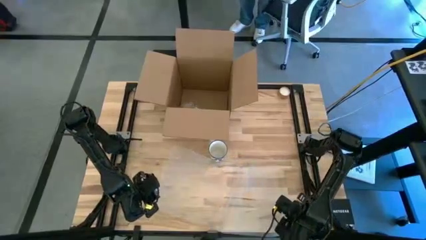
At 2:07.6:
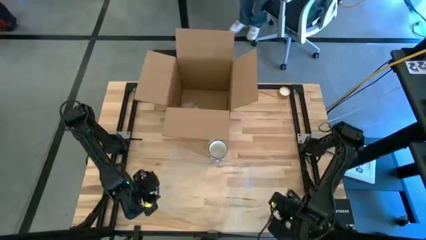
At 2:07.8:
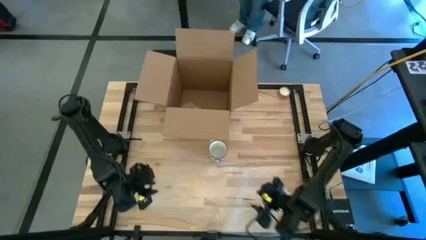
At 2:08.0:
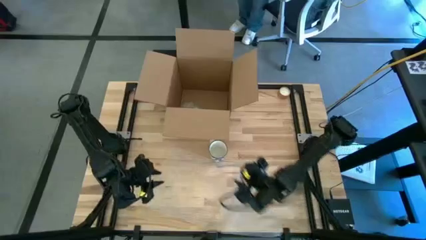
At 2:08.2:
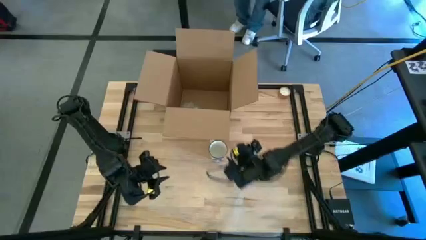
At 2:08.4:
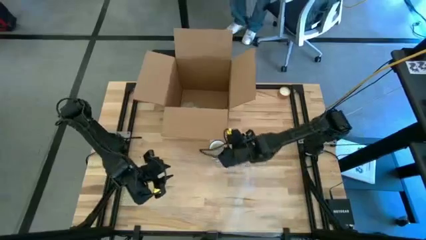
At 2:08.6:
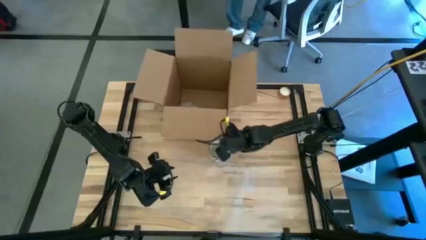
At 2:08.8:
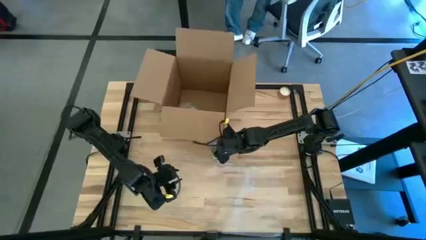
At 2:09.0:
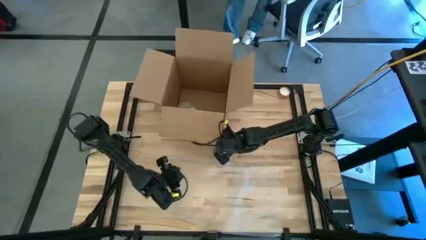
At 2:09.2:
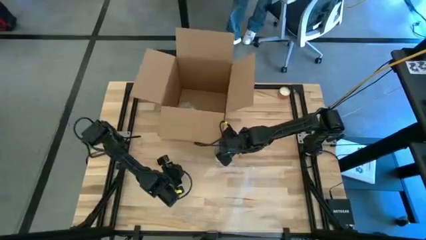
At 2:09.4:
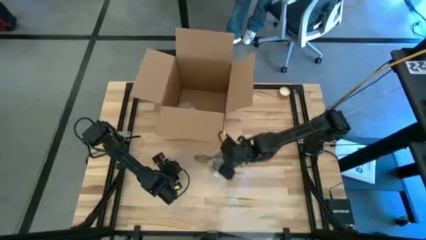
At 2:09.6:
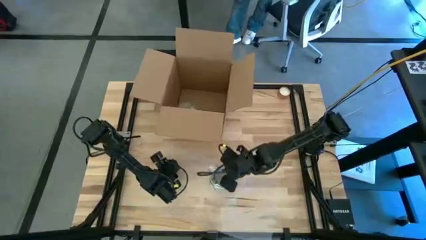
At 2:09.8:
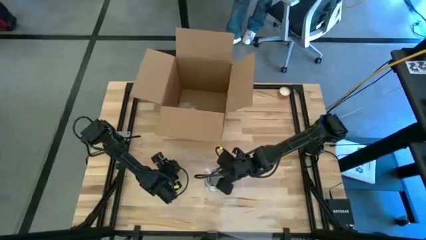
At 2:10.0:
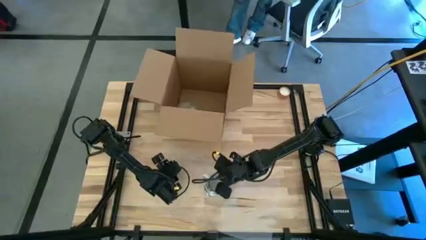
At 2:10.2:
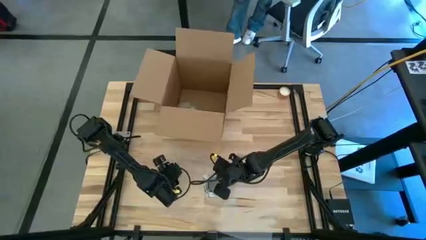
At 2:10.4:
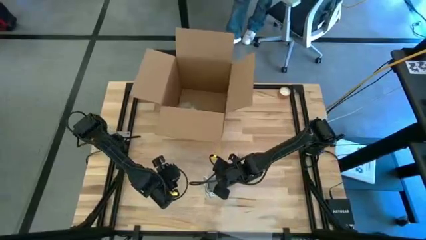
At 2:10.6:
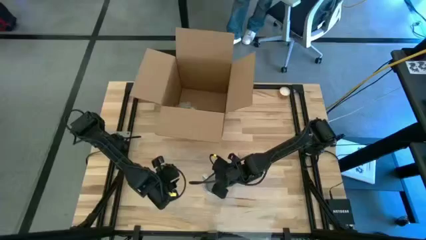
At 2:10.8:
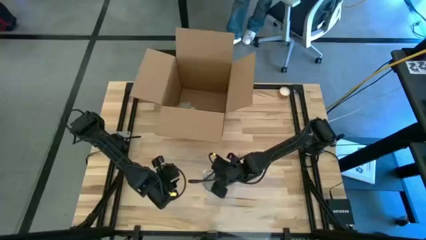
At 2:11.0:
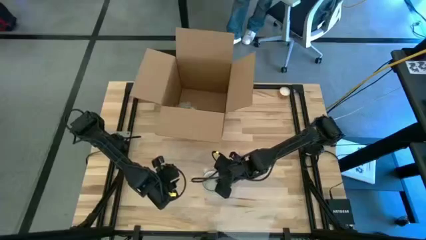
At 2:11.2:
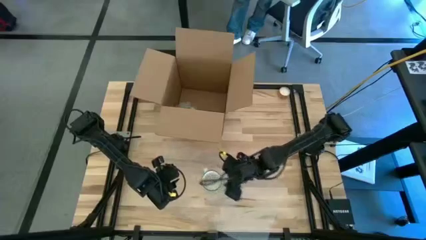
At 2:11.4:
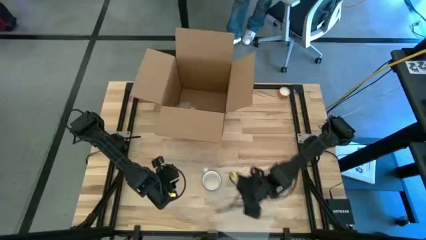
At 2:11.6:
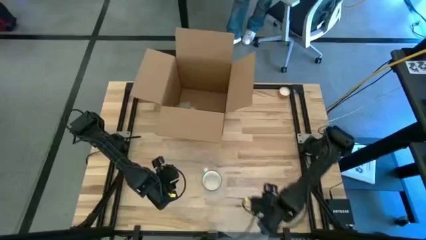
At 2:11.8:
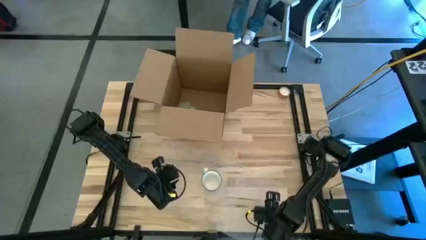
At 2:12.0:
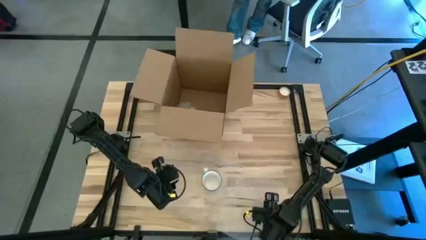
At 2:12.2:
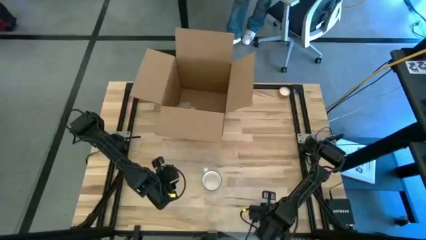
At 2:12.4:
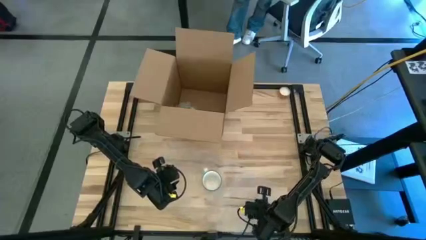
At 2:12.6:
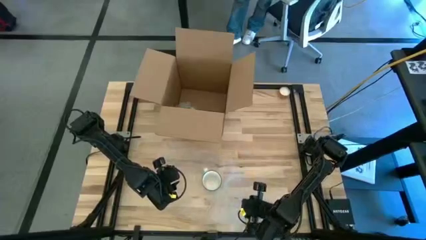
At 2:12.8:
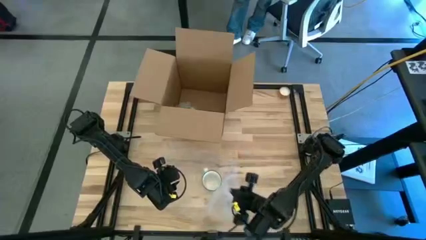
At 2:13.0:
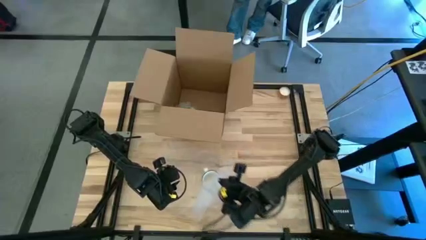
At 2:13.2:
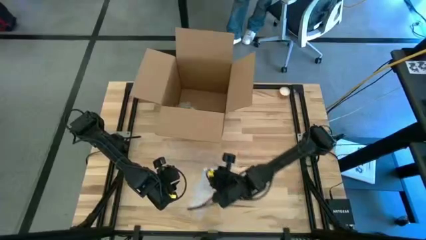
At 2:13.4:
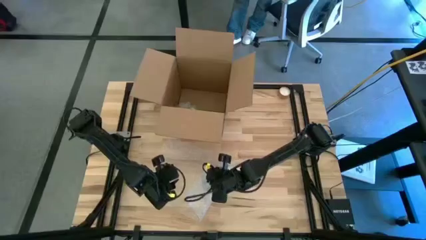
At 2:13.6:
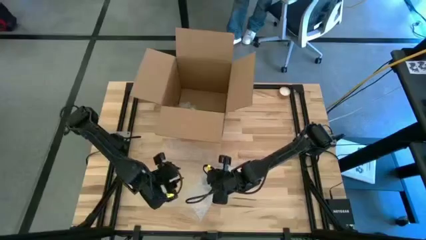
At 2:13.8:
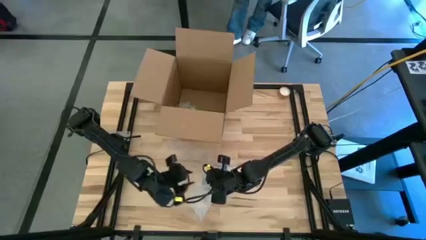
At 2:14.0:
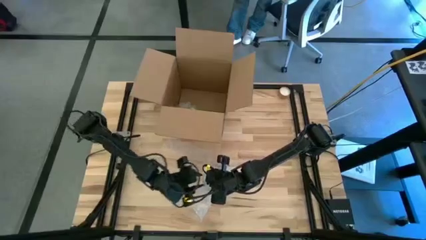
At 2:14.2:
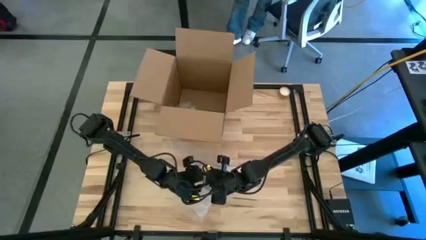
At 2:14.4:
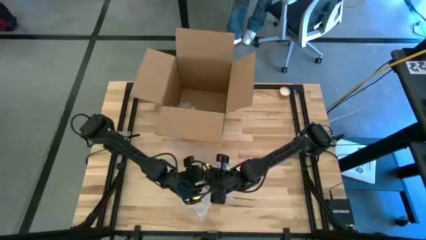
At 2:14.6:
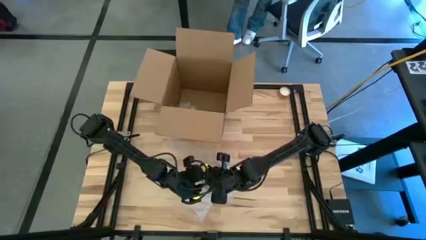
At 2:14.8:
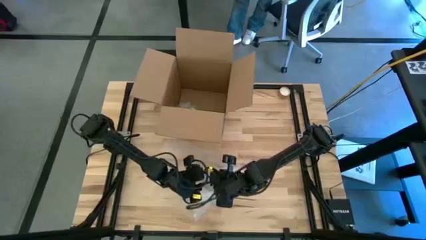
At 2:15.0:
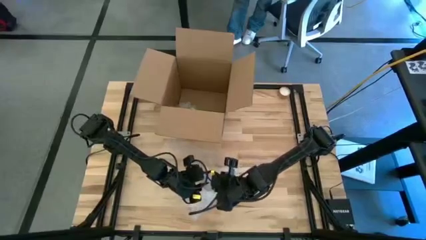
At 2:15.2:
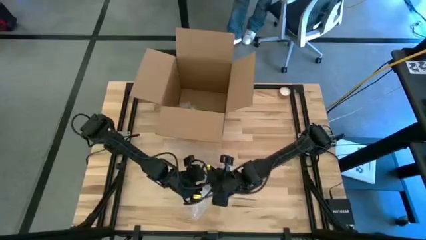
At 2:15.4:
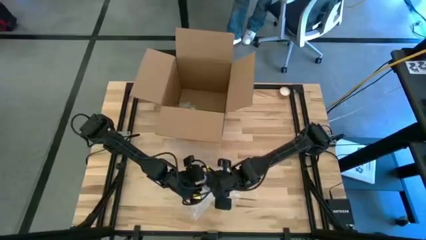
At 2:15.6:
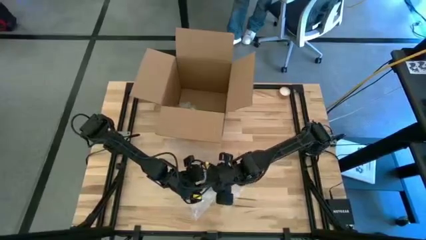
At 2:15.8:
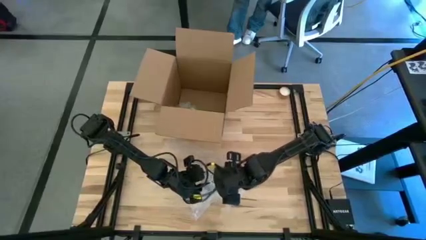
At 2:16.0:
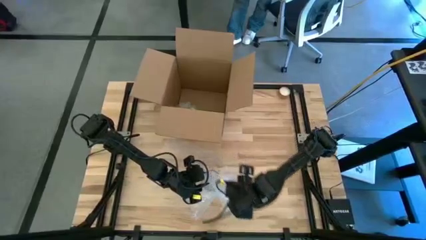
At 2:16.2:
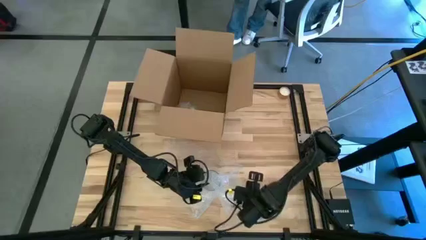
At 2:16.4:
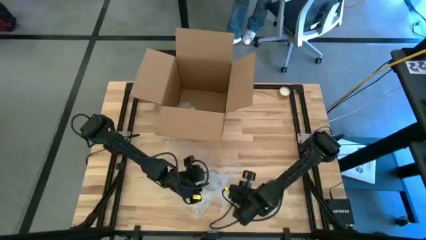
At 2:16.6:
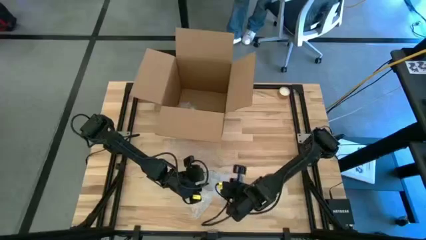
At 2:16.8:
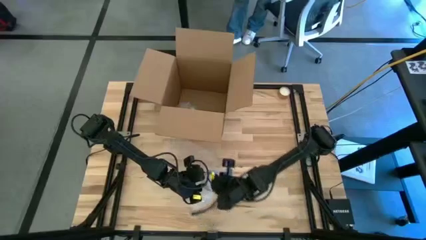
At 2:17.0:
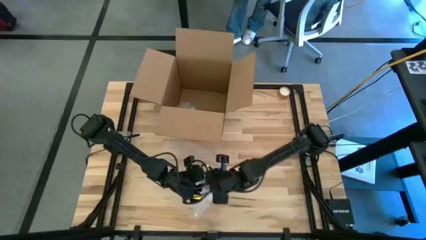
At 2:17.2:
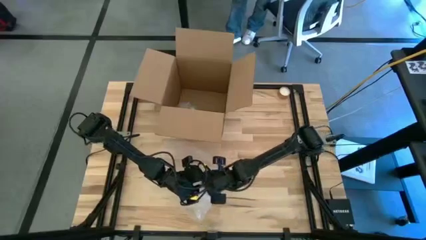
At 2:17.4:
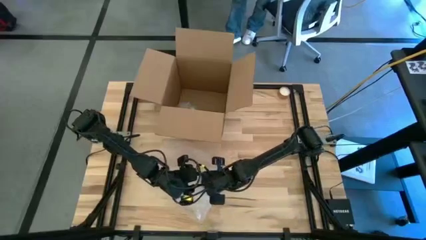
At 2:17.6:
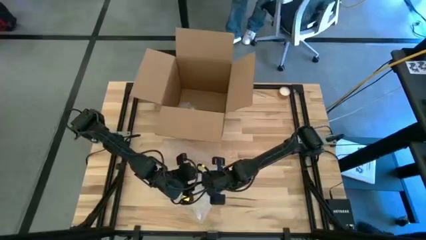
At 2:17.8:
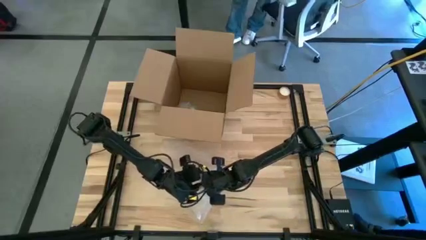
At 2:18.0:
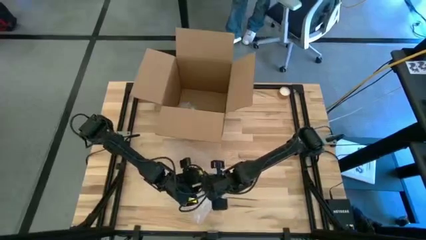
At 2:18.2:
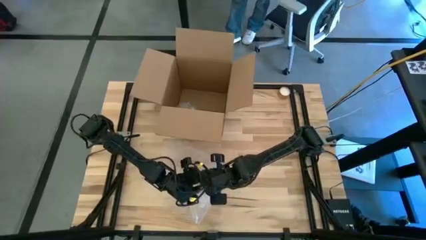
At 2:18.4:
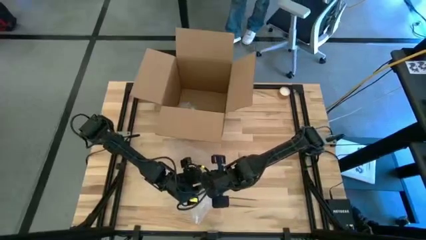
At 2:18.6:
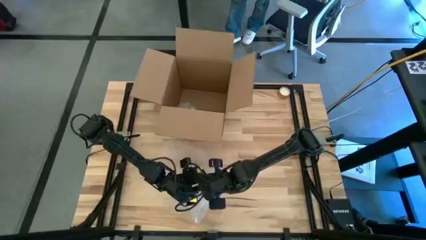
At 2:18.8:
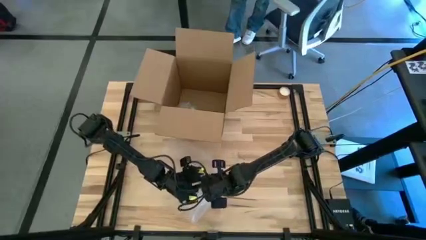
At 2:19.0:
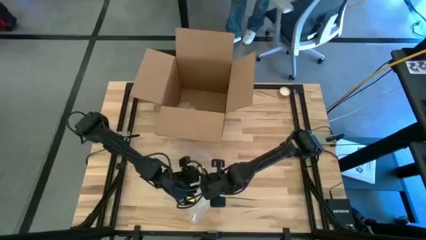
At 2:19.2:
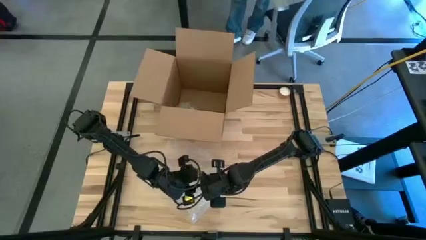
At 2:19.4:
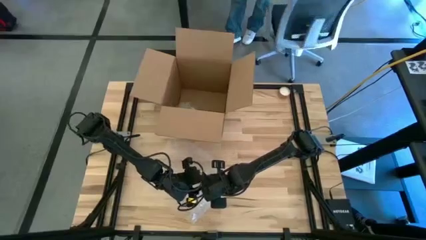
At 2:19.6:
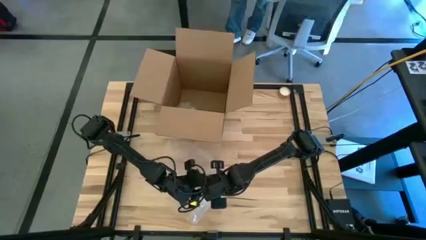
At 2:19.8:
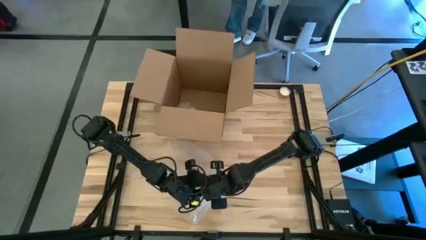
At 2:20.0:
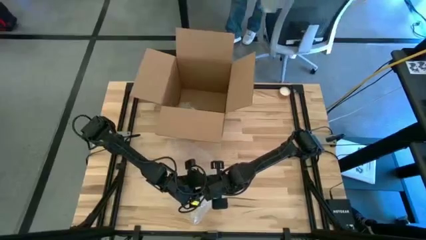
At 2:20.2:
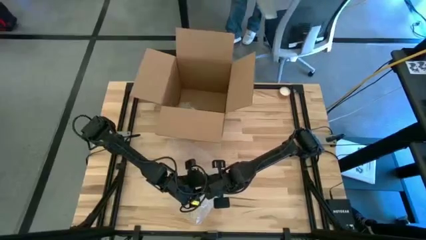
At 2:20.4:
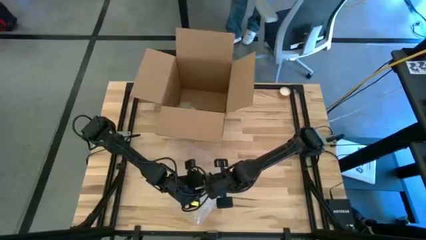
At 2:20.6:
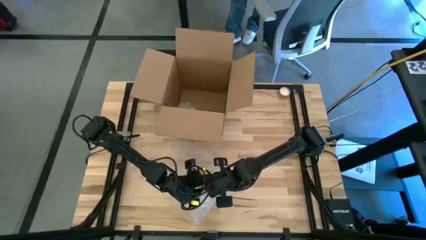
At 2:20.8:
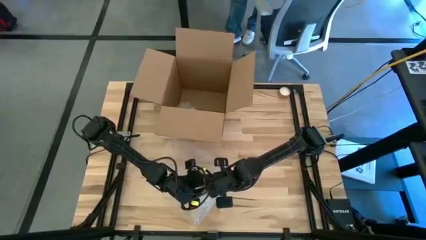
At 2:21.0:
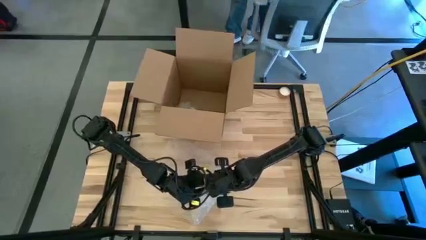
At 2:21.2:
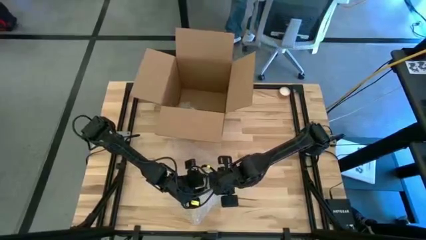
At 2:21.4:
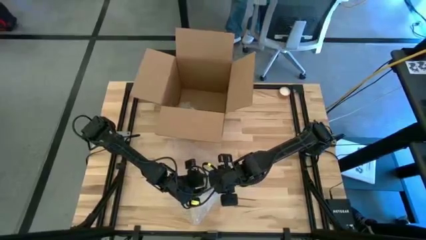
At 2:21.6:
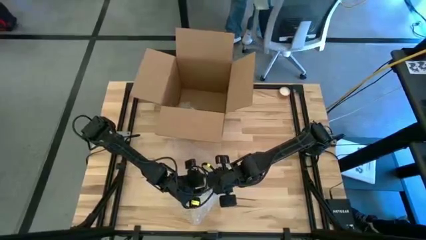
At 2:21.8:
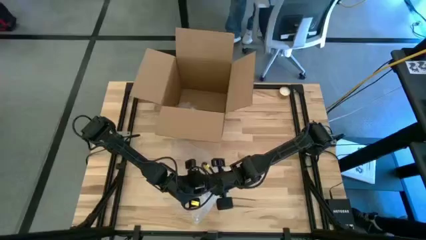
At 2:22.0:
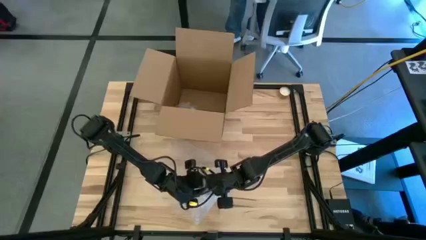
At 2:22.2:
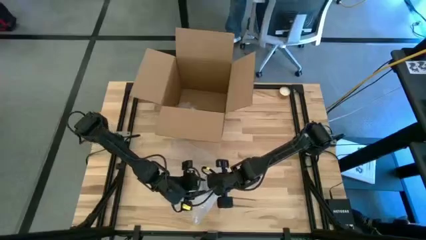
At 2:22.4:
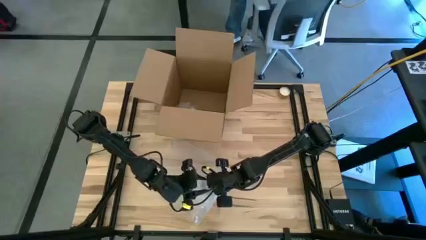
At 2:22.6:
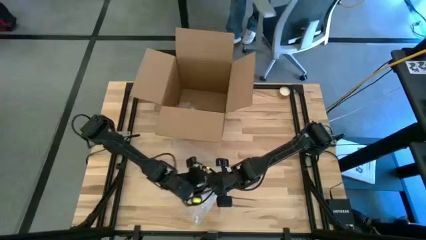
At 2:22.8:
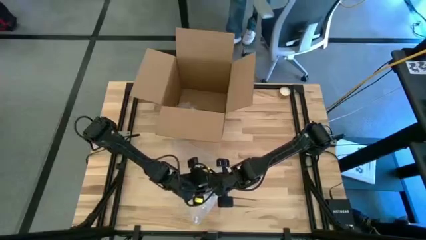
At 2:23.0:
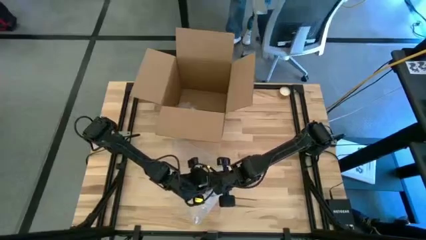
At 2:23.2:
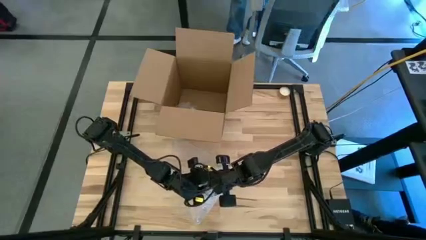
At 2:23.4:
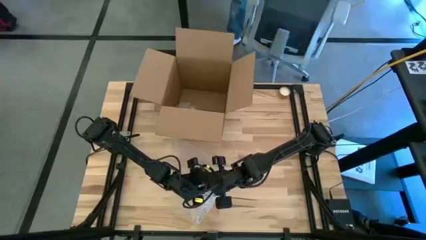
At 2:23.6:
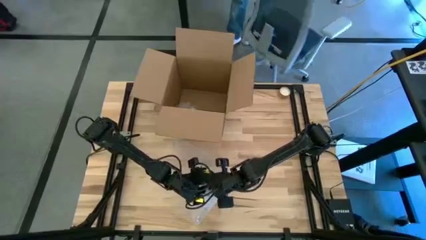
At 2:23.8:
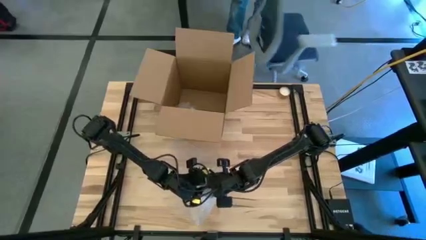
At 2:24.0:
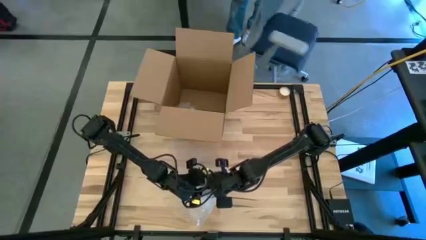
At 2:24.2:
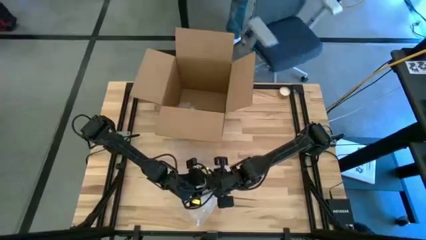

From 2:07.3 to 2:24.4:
Task: wrap mug
Wrap the white mug with transparent bubble wrap
